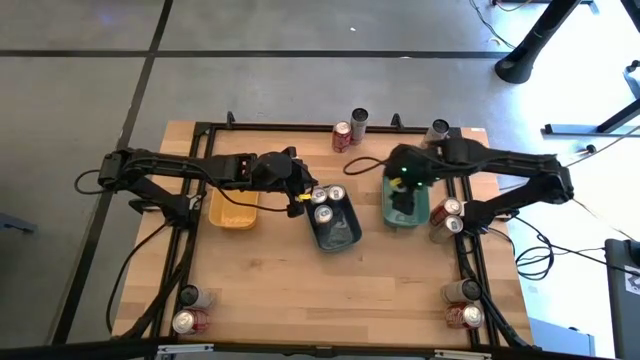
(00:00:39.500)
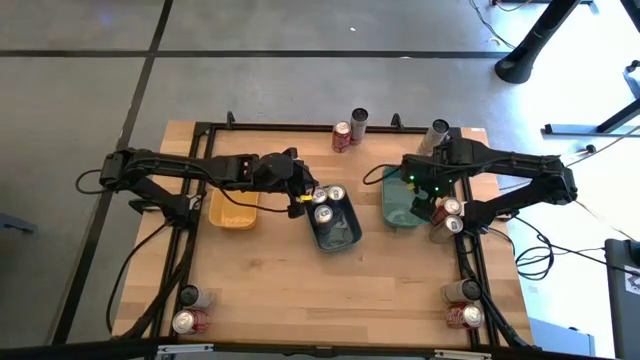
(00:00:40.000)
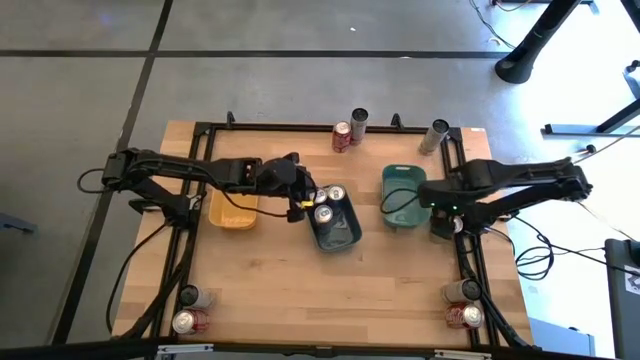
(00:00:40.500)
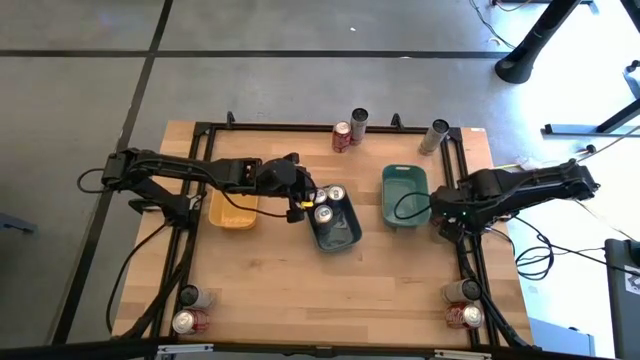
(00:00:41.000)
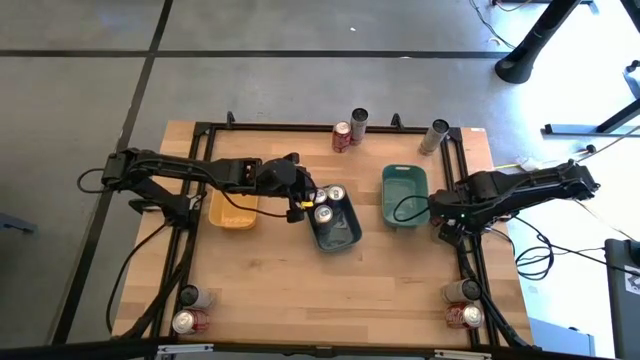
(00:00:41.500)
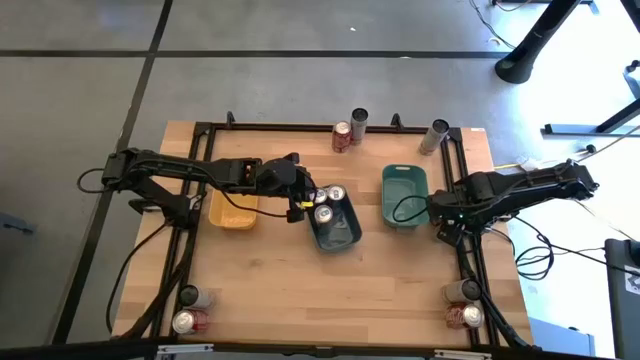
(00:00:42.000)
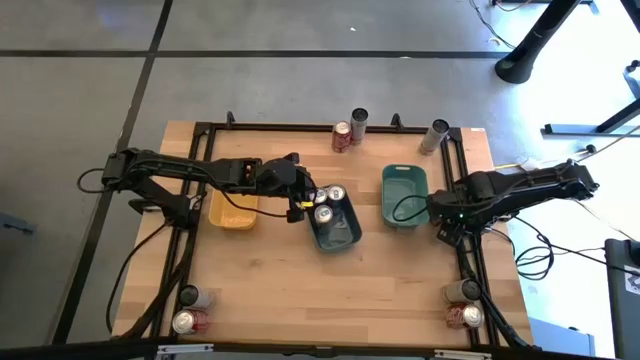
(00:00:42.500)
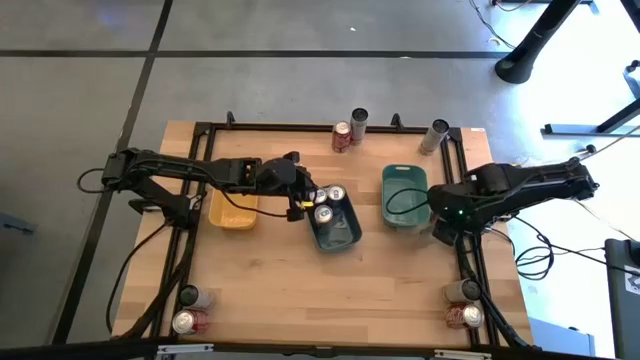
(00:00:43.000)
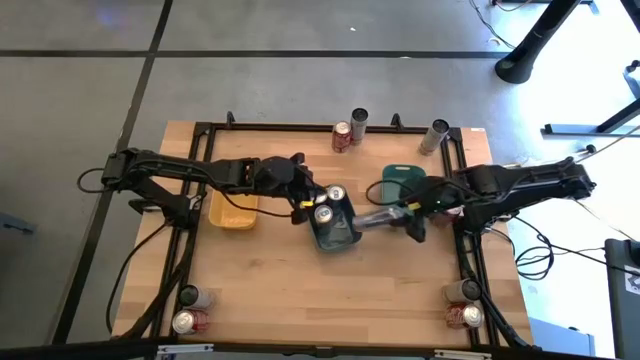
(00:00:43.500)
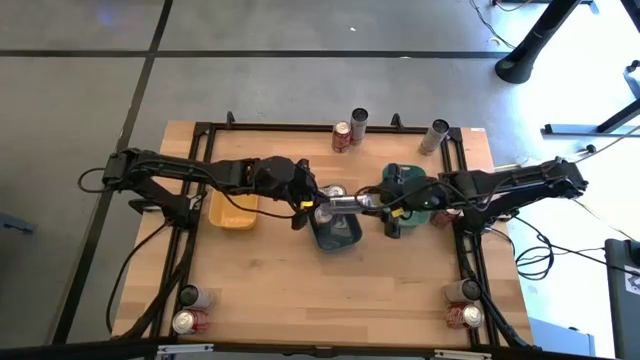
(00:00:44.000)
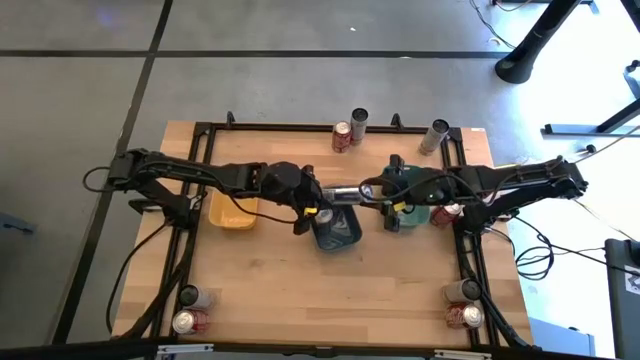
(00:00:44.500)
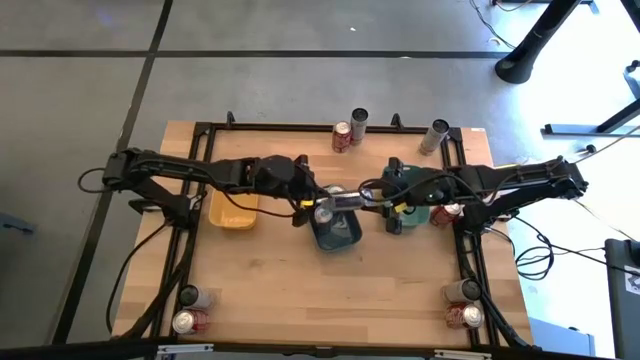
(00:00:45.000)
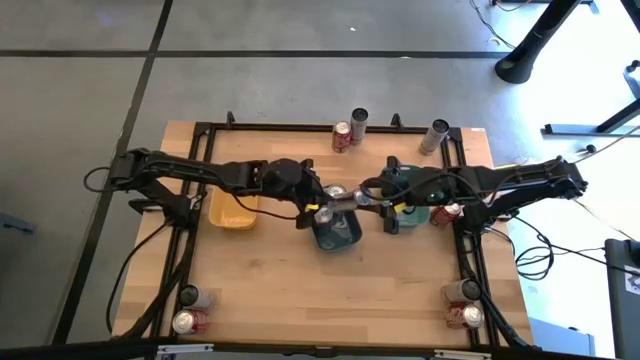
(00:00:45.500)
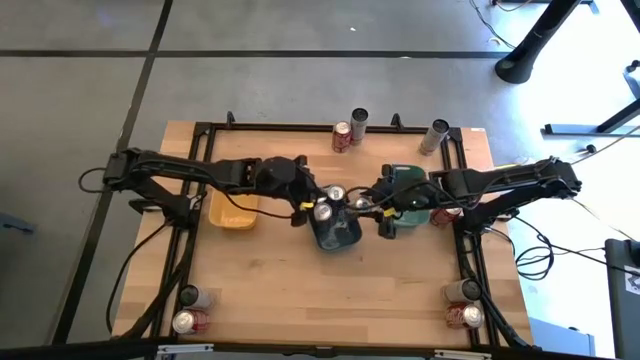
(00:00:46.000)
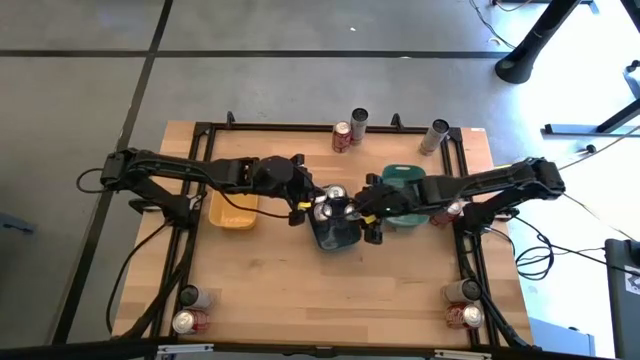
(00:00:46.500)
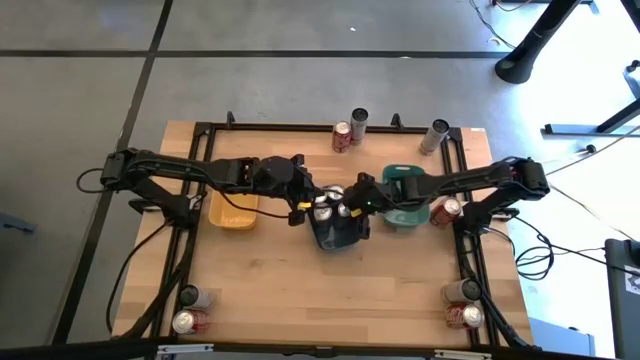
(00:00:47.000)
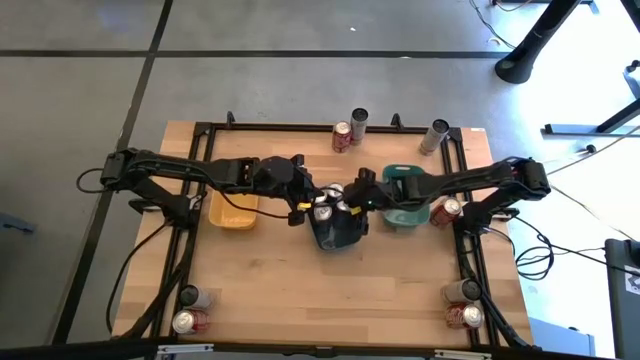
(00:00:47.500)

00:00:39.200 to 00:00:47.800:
Task: Sort soda cans
Put the blue soda can into blue bin

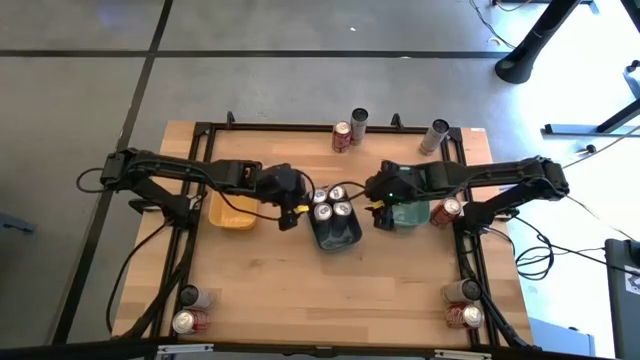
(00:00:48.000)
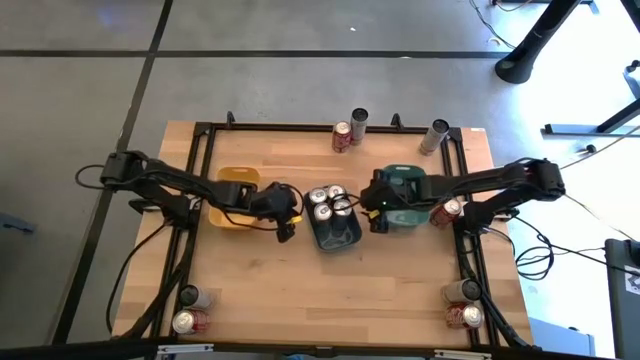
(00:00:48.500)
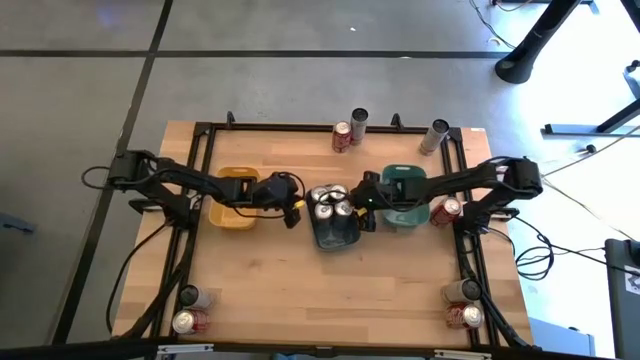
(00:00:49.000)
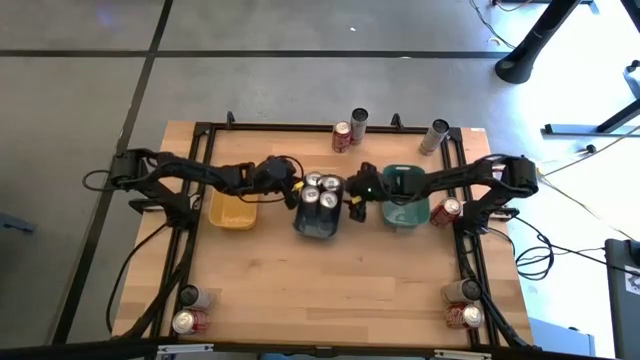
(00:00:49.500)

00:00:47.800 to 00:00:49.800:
Adjust the blue bin on the table

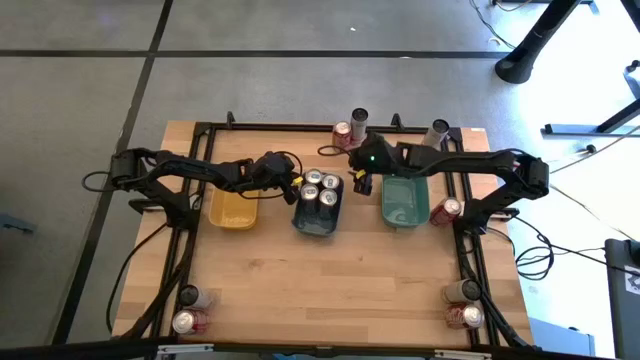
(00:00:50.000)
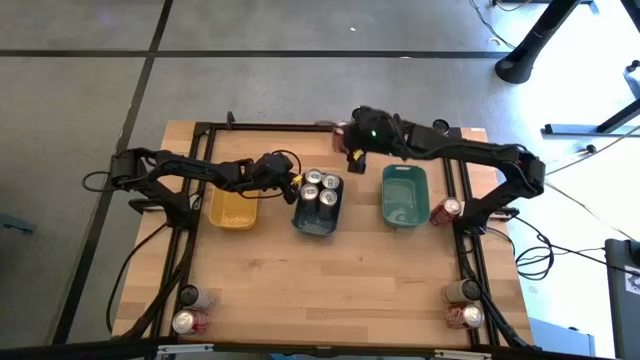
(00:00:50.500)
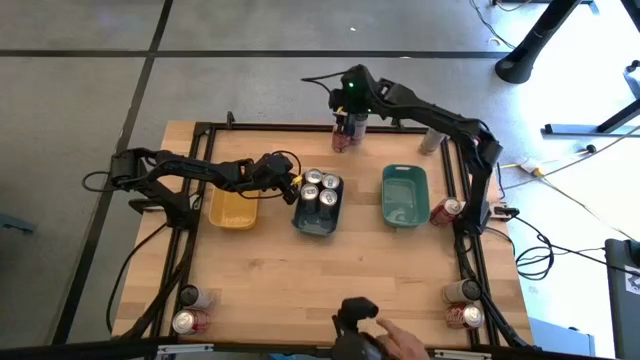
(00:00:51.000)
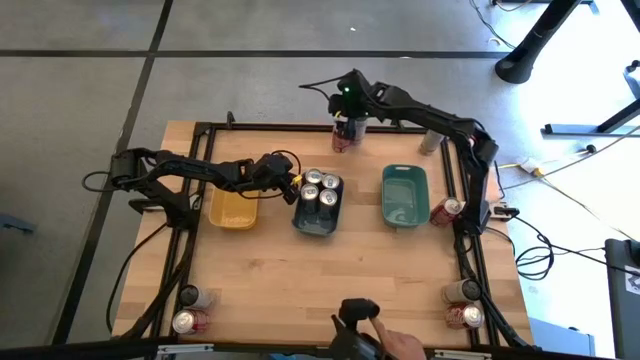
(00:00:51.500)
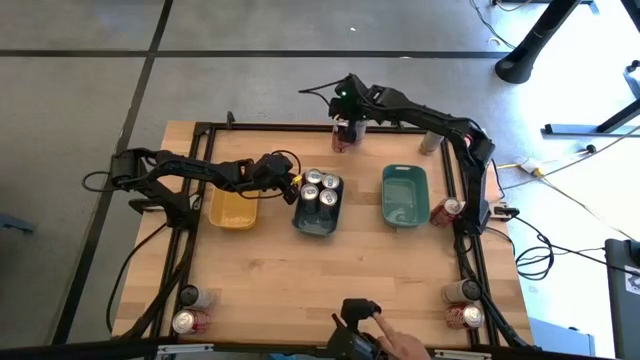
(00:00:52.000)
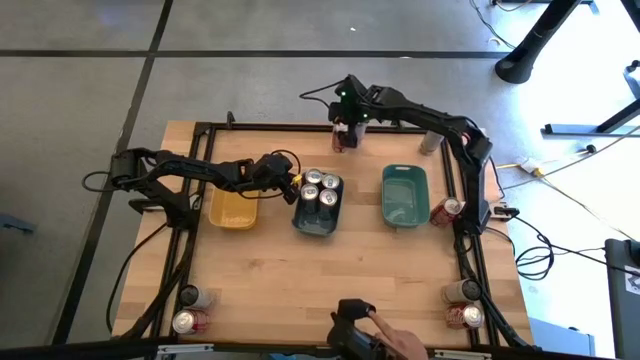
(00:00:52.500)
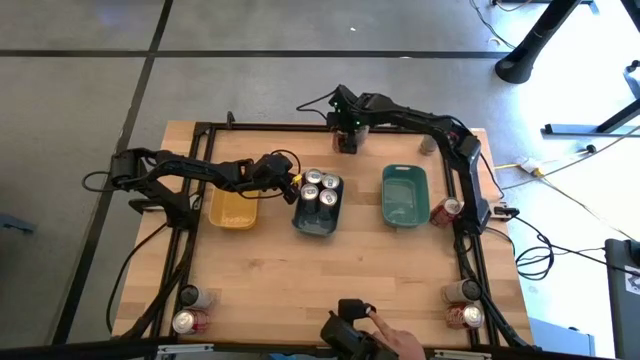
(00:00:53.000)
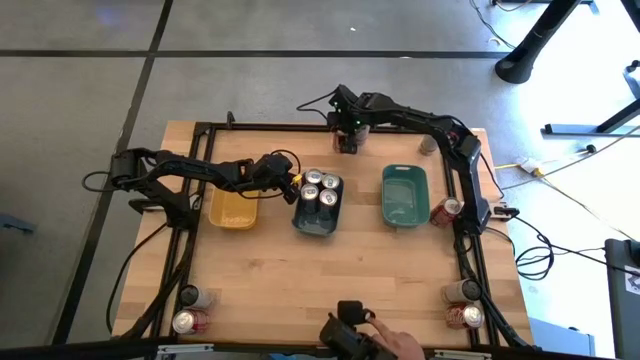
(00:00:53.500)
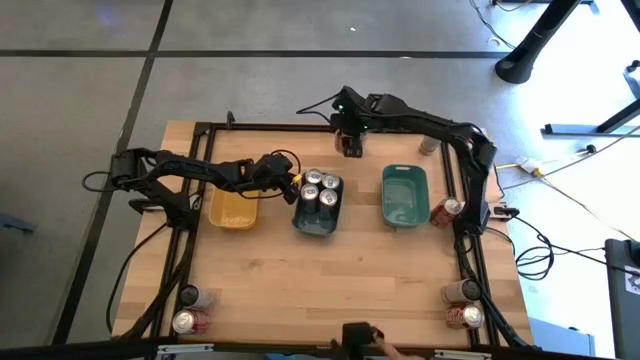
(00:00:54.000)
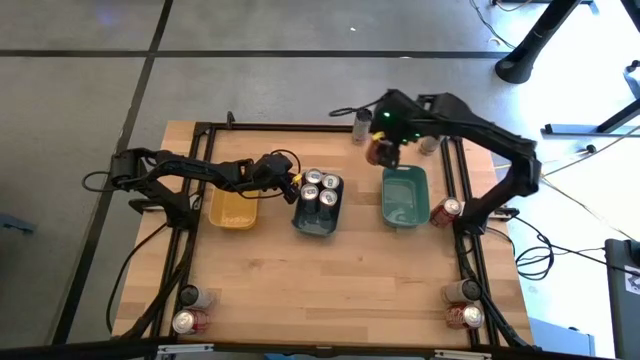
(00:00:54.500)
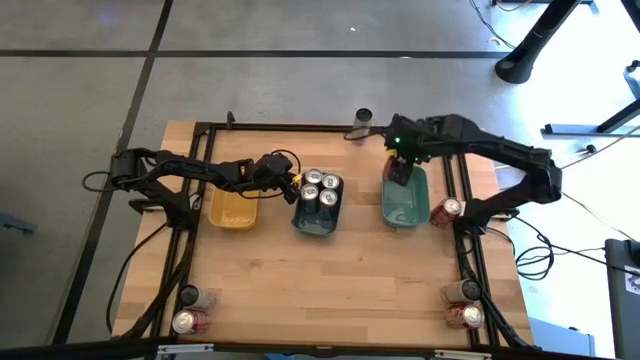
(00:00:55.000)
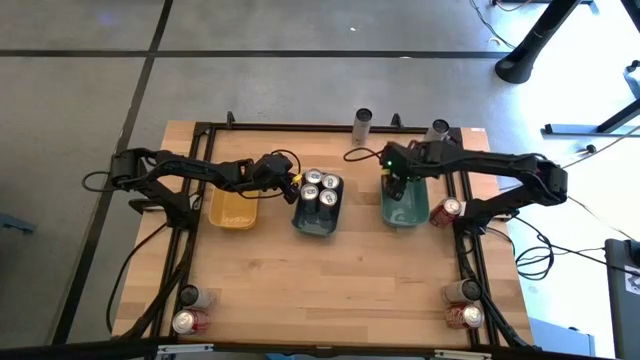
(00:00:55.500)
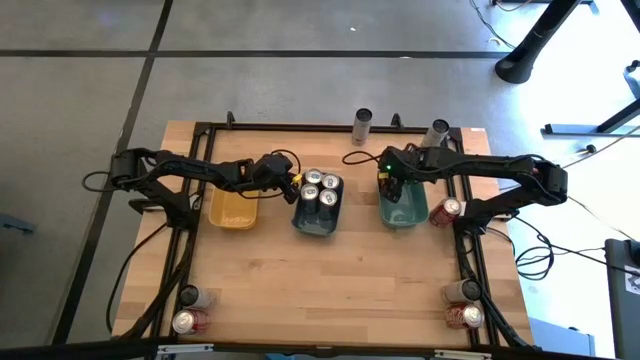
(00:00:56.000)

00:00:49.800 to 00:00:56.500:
Put the red soda can into green bin

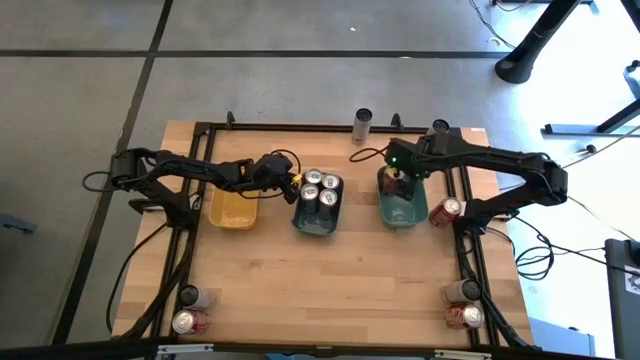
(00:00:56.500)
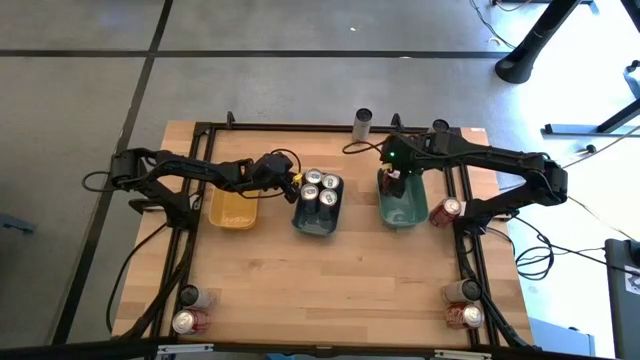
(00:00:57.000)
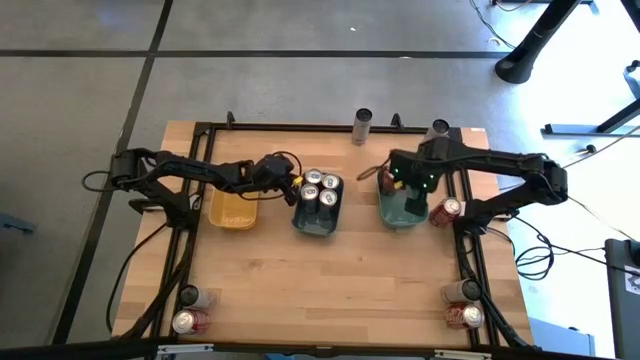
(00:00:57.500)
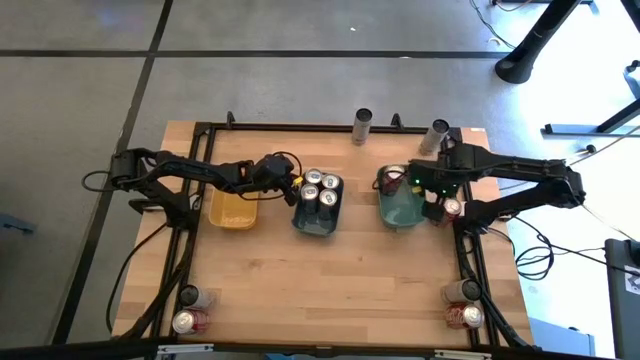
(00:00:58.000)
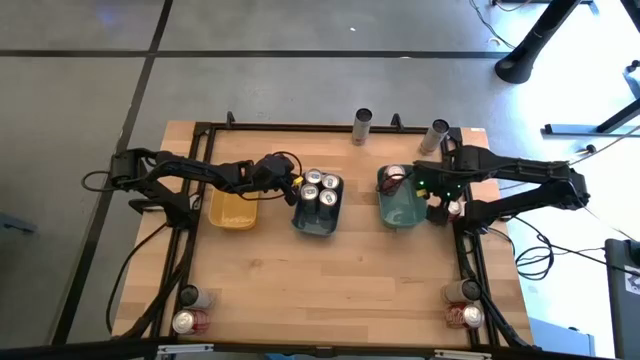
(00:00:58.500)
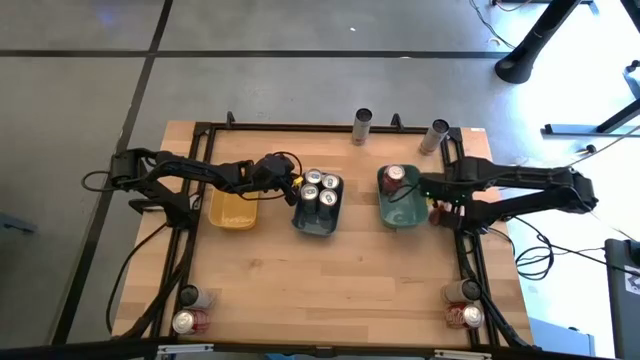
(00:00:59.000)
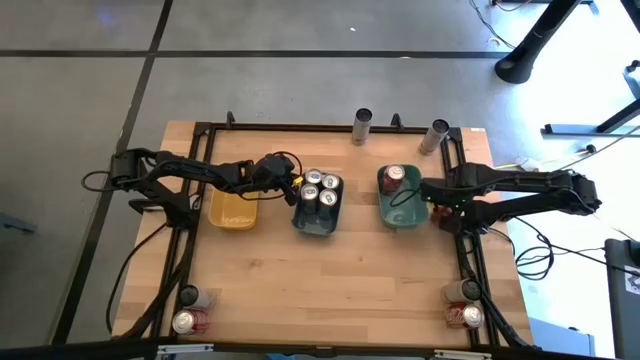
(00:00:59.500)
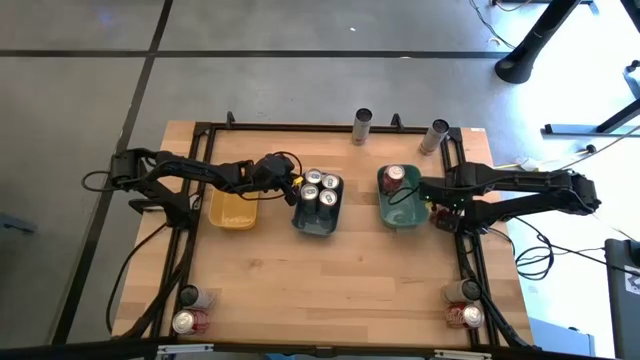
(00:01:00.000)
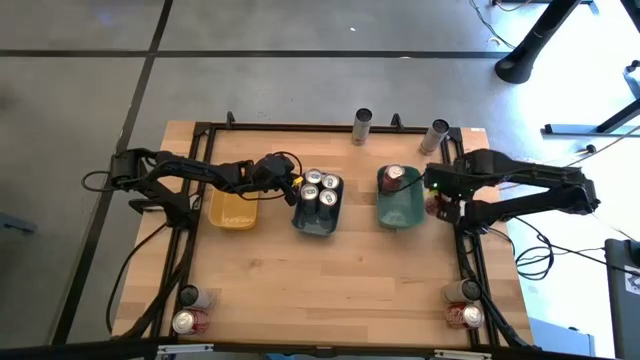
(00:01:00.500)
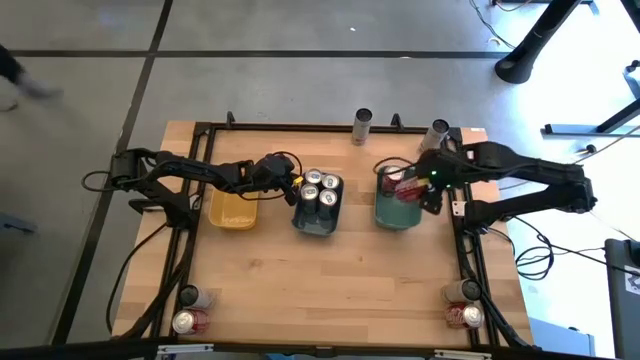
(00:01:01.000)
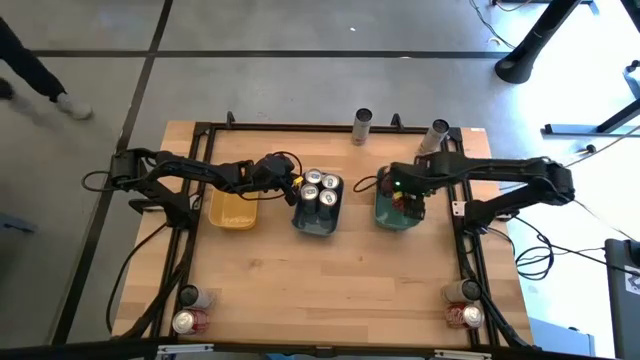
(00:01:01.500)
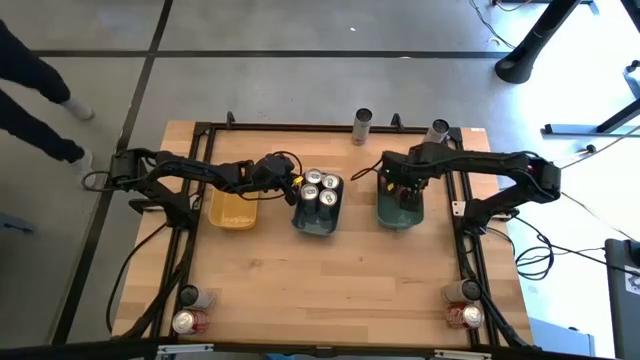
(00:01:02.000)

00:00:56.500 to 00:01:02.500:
Put the red soda can into green bin
